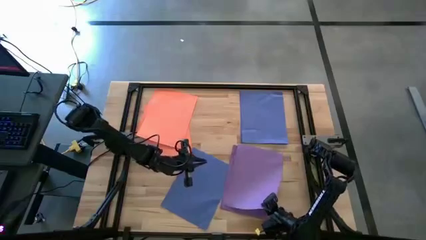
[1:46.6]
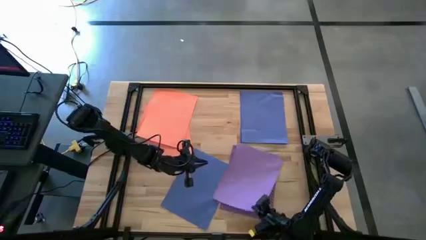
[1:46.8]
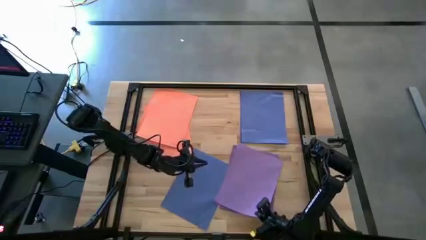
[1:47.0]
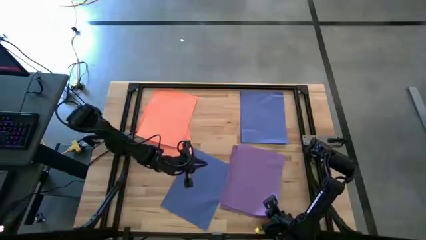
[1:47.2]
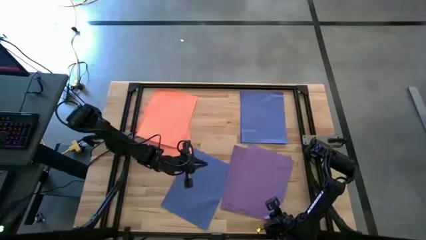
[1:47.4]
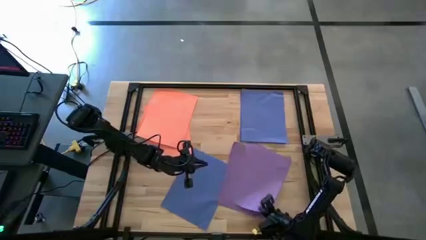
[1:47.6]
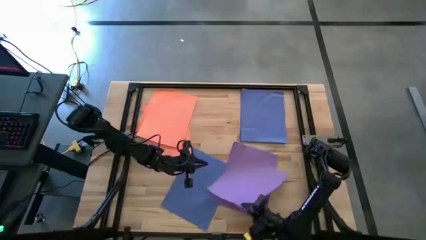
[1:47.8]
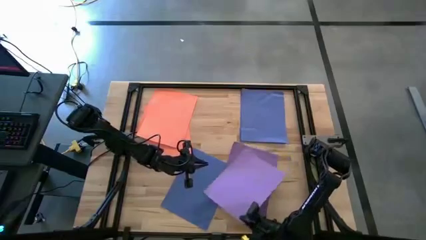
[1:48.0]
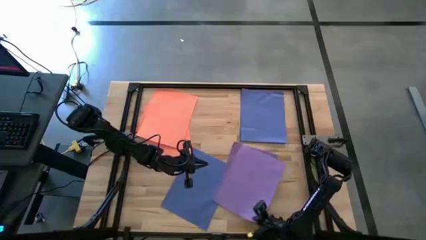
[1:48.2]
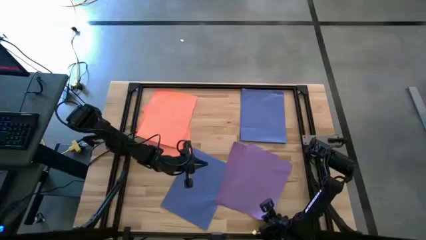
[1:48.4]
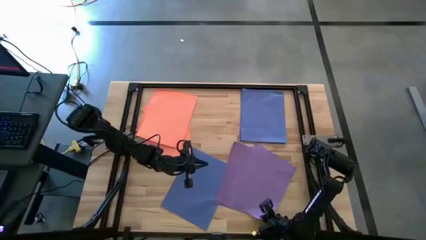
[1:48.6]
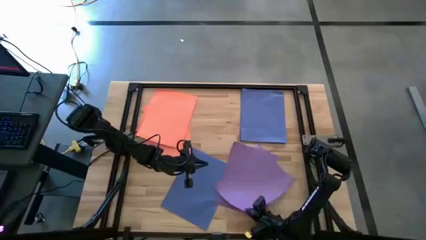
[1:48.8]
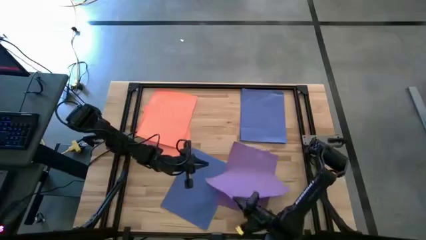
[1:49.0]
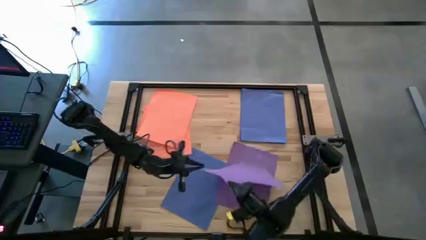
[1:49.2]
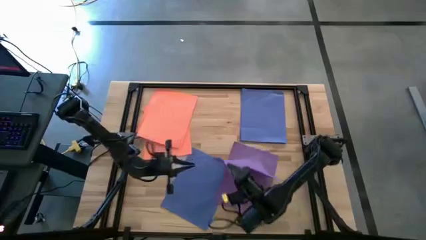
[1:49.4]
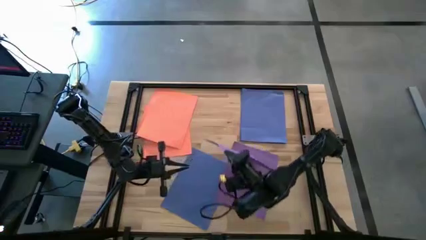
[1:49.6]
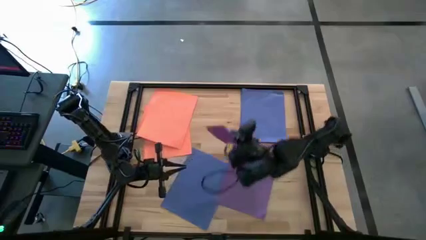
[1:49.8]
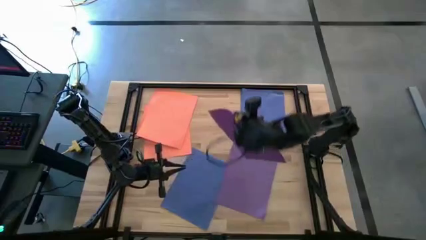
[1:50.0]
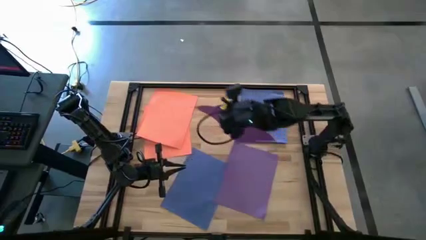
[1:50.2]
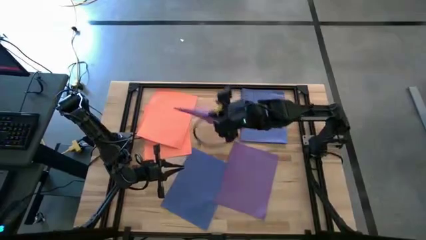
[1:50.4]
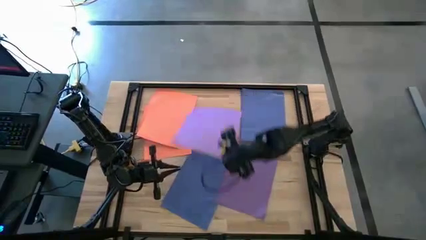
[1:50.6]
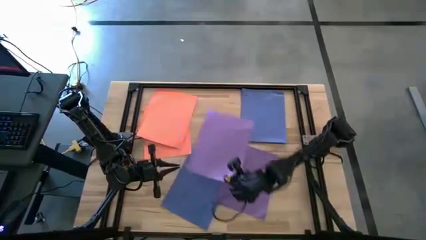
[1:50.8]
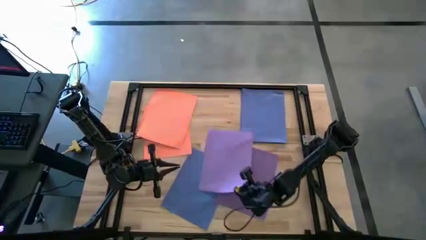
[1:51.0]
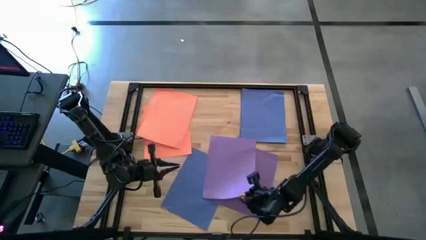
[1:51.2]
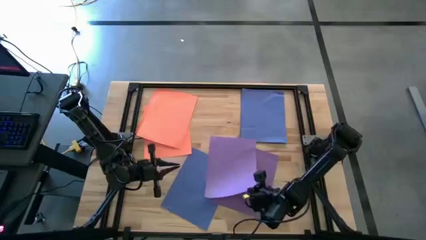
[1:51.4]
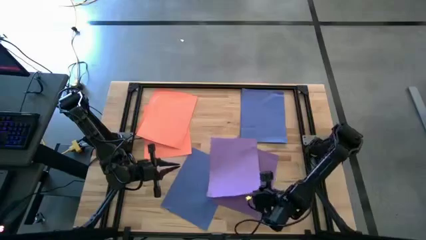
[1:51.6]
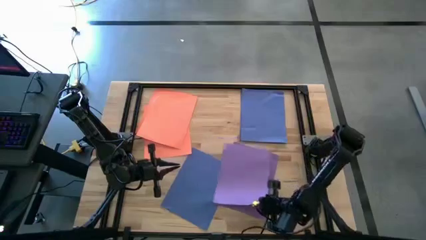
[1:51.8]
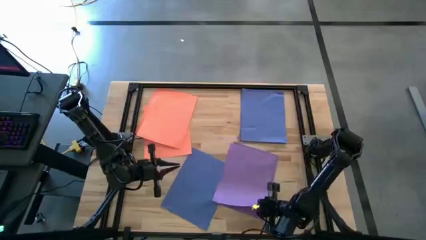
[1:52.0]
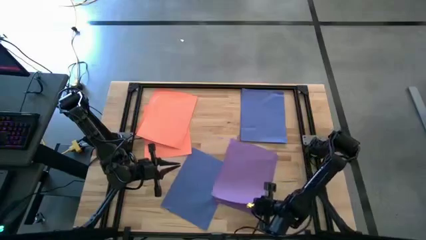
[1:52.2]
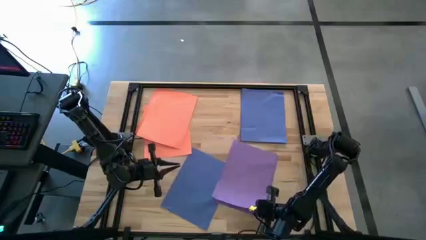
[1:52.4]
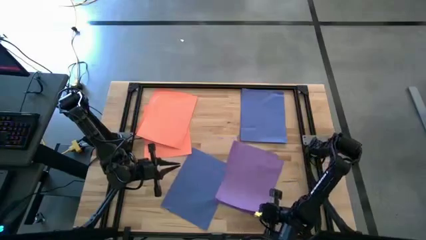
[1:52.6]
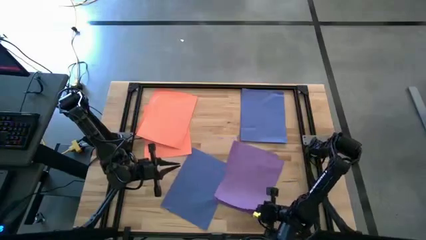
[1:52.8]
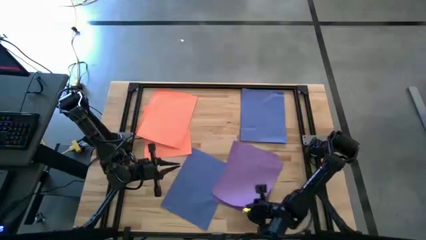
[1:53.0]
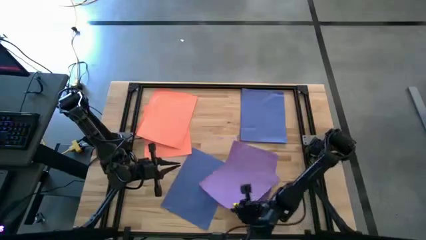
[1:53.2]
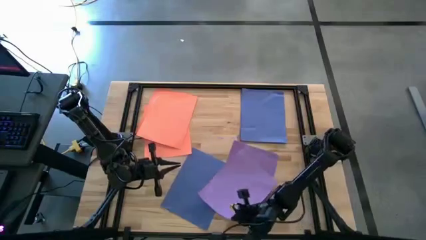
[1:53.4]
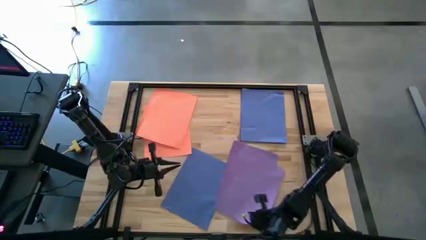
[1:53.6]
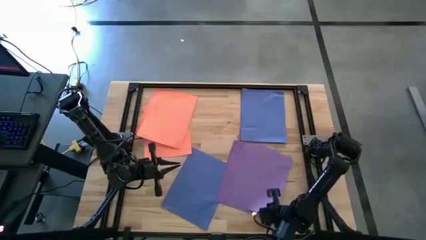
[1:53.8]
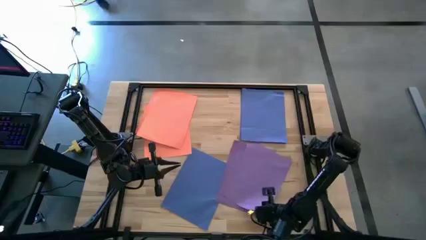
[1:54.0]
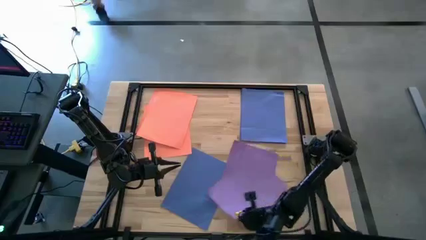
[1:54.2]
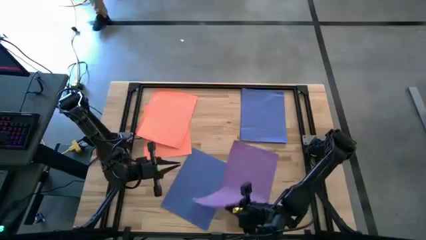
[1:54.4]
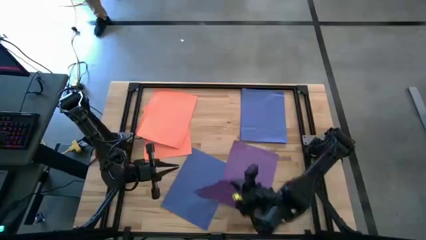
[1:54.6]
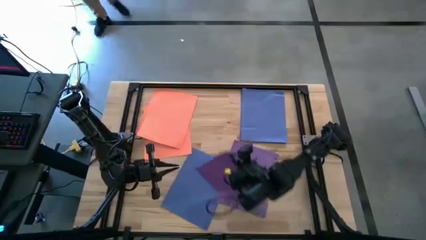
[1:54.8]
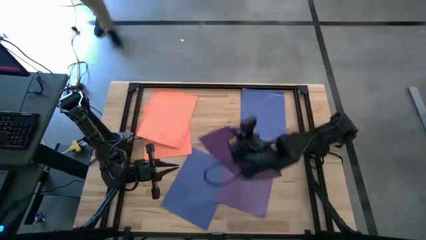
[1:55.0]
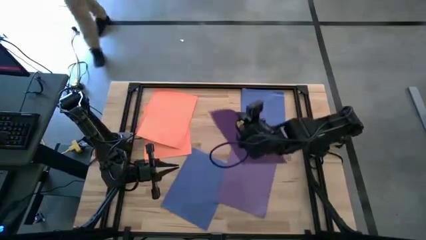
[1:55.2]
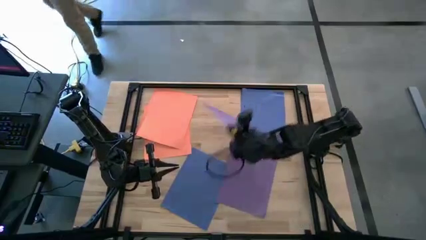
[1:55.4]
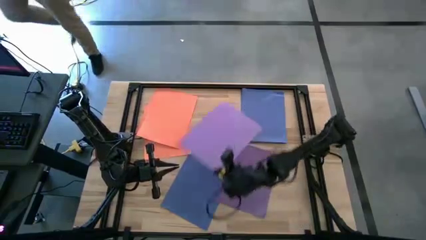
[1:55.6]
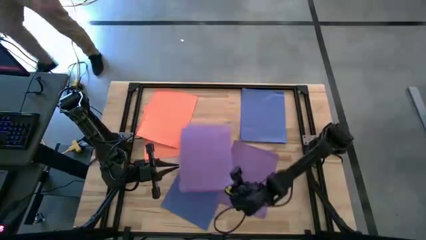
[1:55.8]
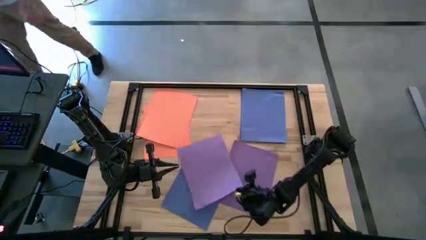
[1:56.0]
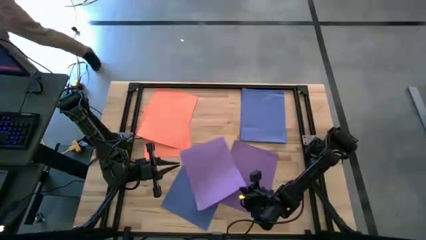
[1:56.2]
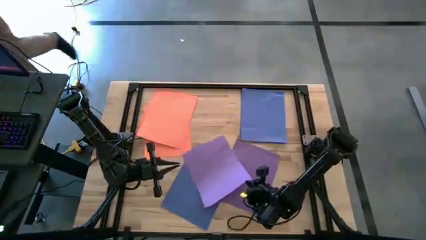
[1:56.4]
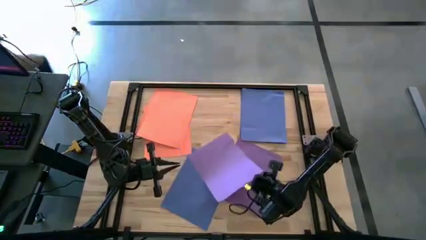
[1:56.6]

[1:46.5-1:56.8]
Task: Organize paper
Stack the purple paper on top of the purple paper

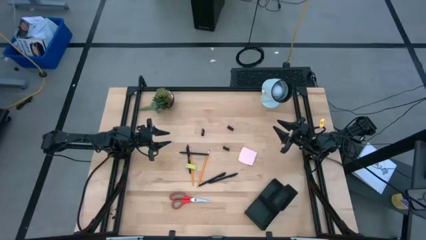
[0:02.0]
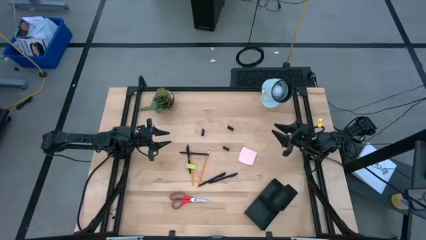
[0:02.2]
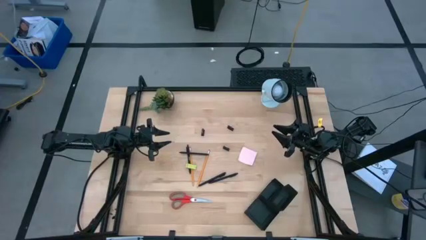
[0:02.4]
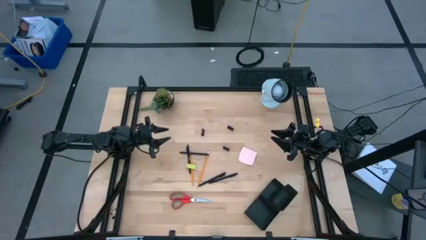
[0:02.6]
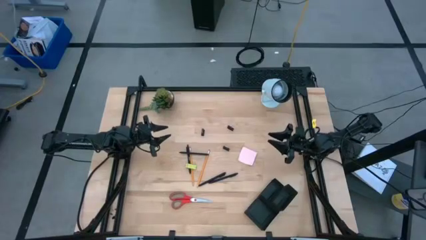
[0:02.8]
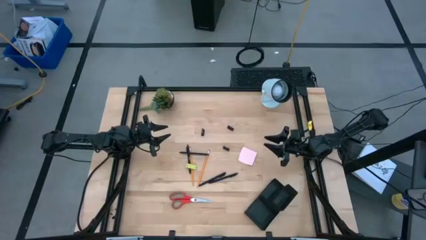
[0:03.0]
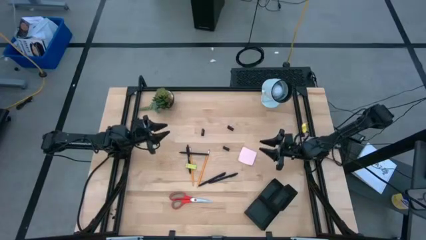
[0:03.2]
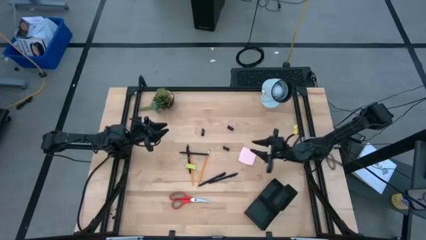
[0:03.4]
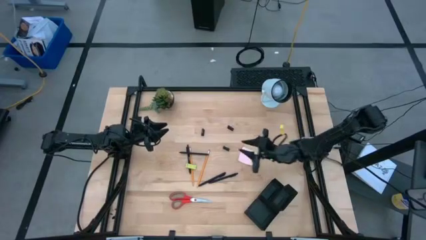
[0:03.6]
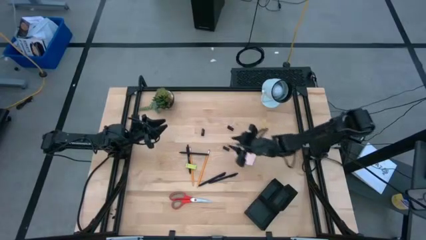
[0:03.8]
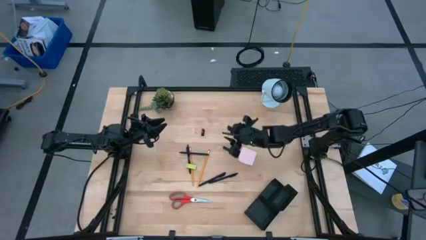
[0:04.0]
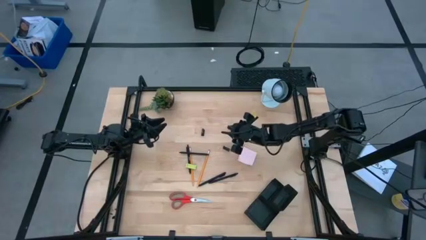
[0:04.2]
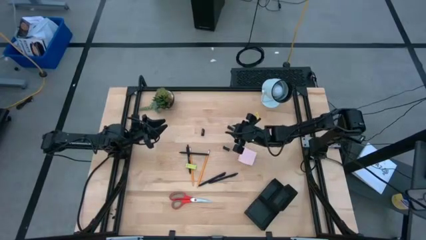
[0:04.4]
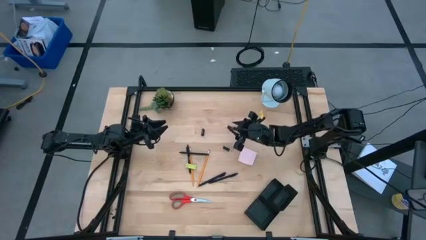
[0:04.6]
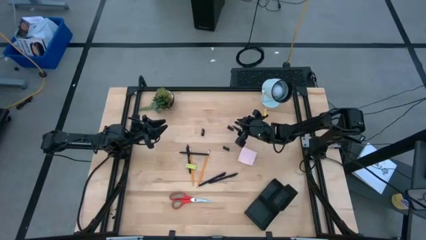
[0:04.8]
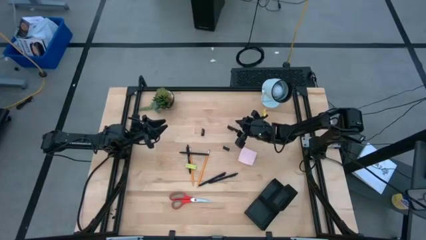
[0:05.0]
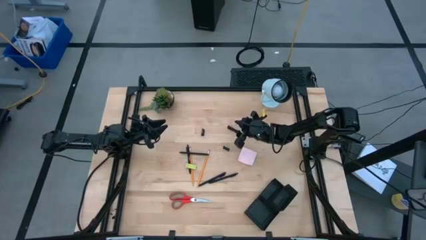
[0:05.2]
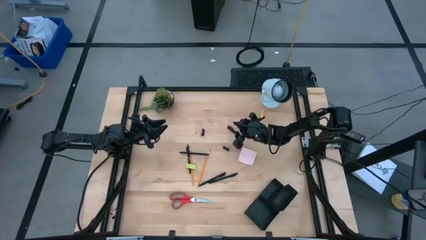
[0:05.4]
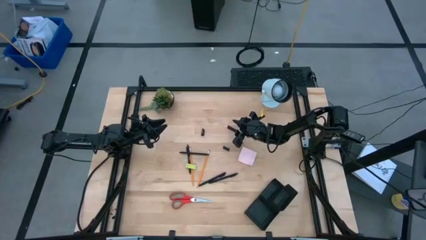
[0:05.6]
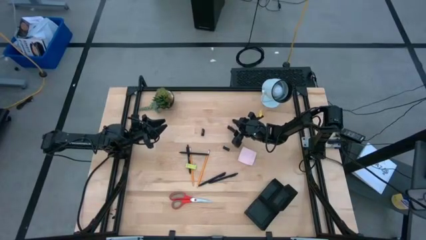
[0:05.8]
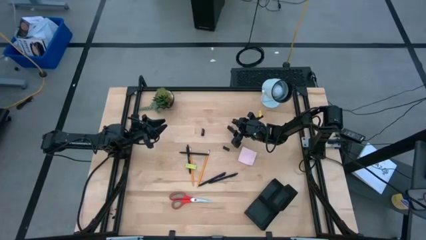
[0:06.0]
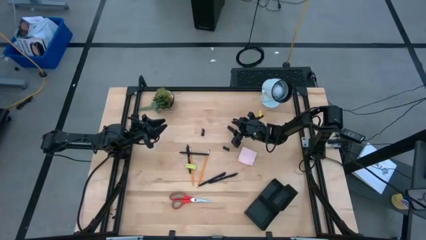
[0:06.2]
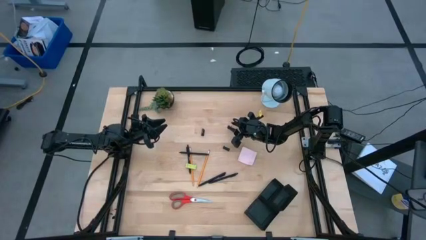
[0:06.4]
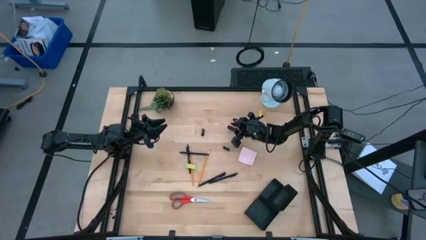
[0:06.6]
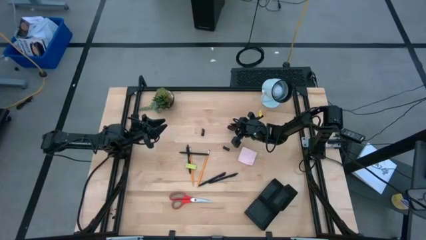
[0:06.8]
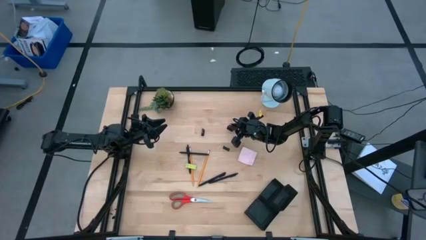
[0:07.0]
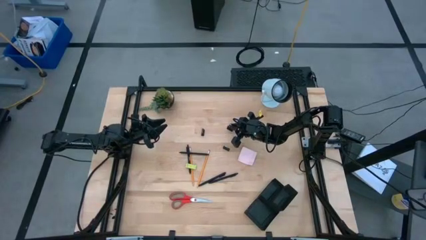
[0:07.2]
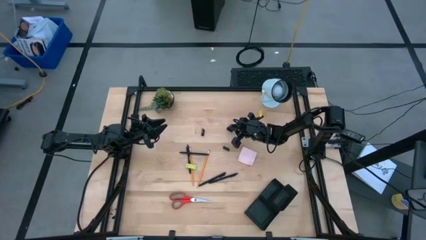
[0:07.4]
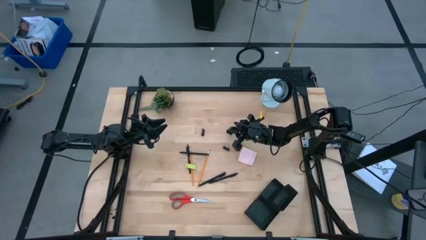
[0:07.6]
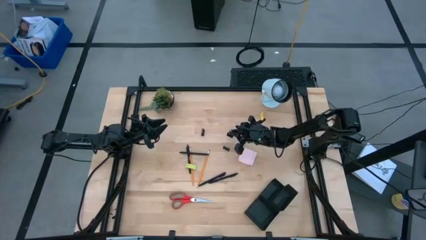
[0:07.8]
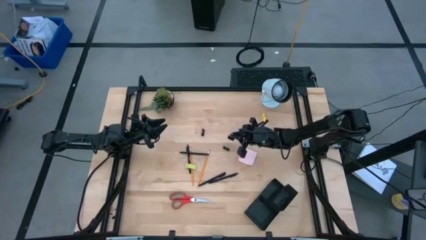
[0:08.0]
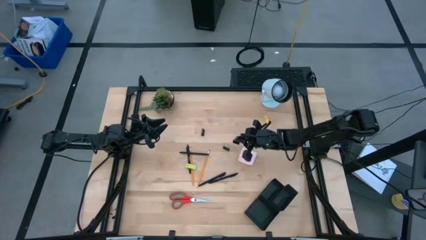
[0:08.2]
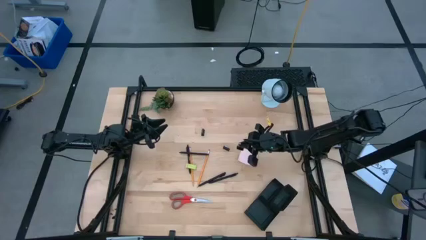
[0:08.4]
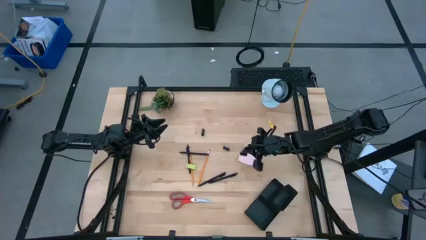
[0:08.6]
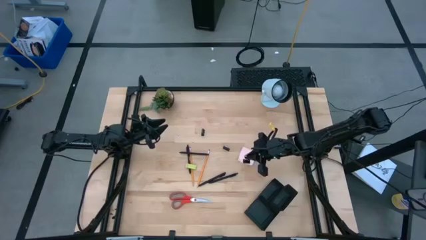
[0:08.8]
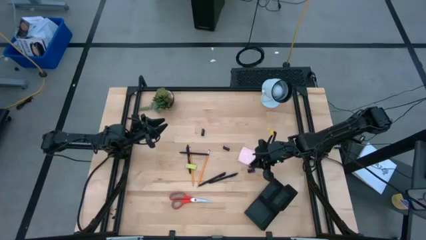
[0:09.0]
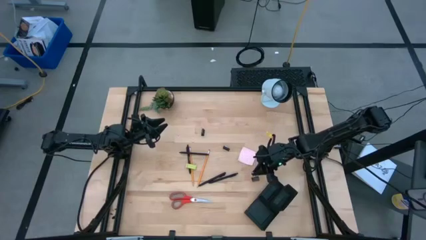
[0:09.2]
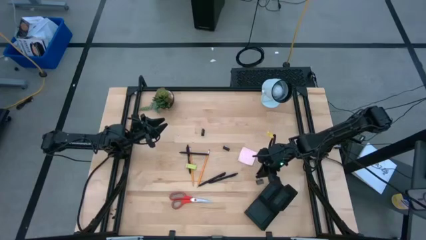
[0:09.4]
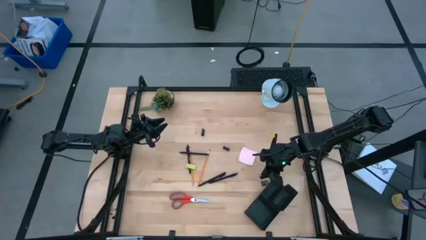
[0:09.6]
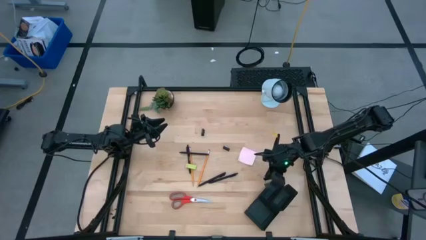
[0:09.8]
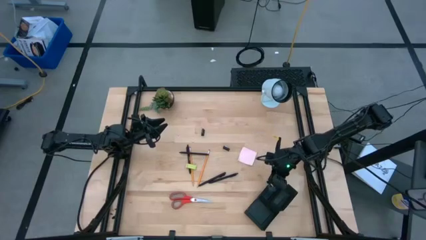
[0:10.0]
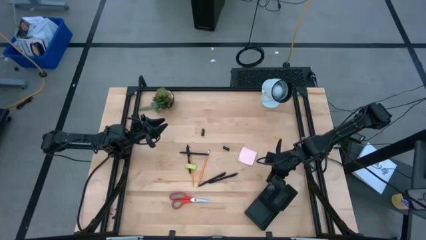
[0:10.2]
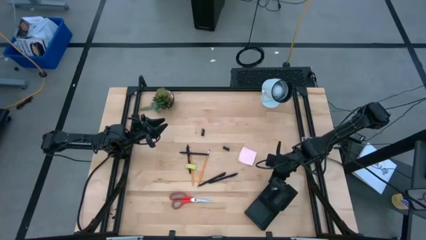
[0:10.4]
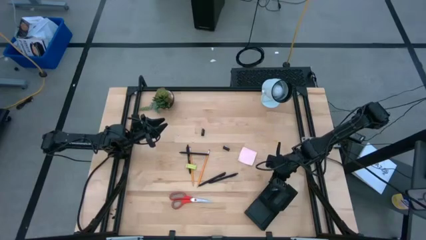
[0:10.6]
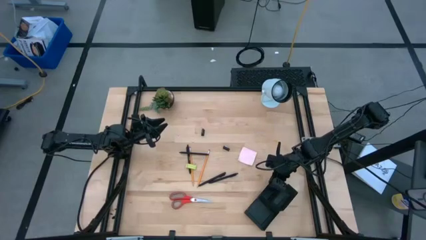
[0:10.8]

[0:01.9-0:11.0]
Task: Pick and place office supplies into organizer
Put the black clip binder into the desk organizer
